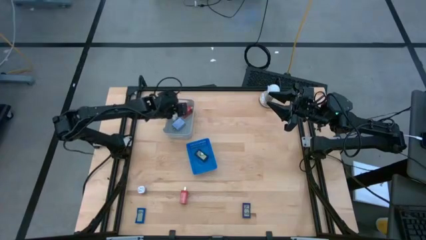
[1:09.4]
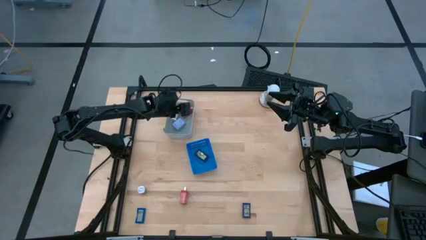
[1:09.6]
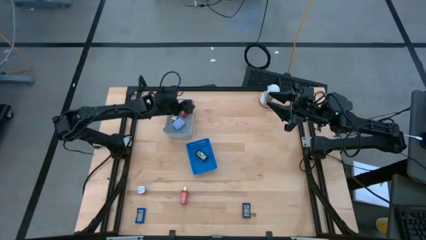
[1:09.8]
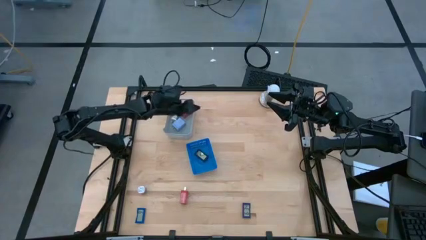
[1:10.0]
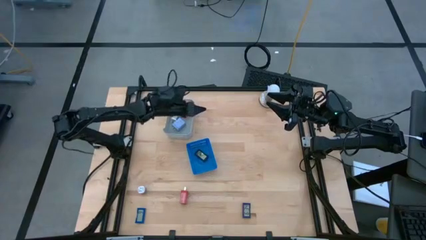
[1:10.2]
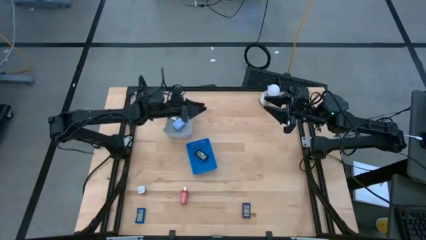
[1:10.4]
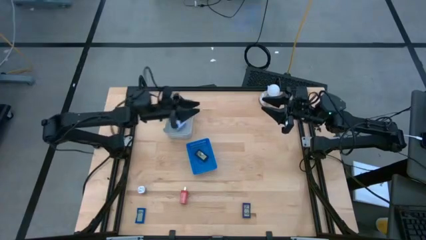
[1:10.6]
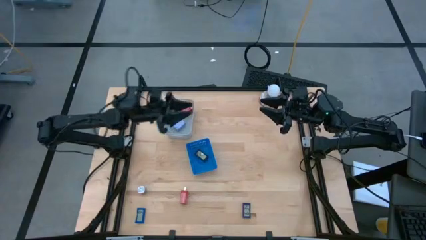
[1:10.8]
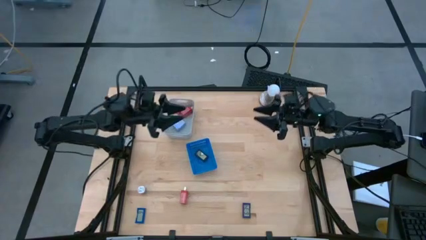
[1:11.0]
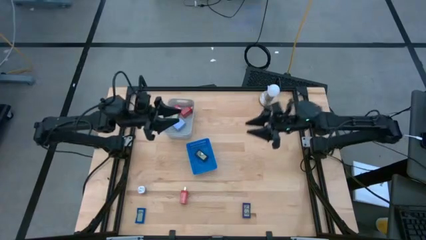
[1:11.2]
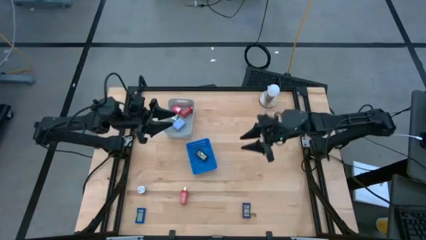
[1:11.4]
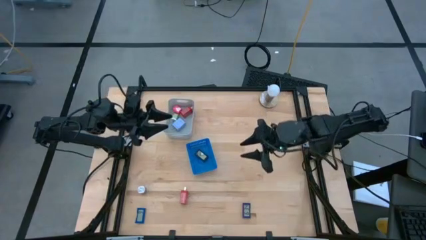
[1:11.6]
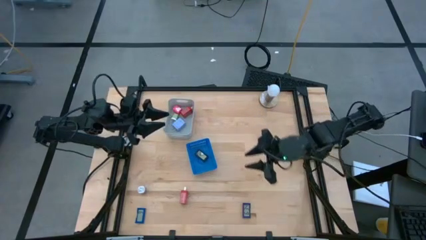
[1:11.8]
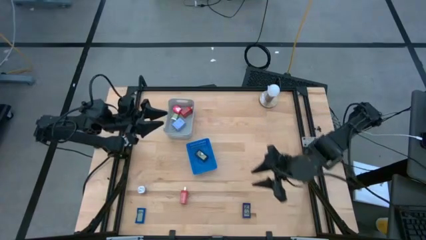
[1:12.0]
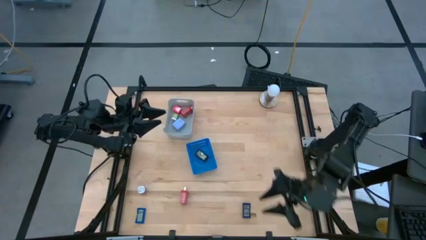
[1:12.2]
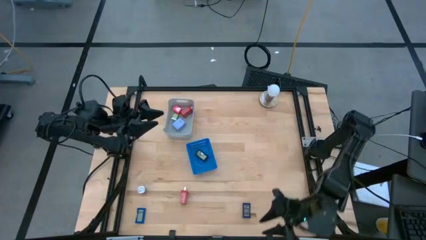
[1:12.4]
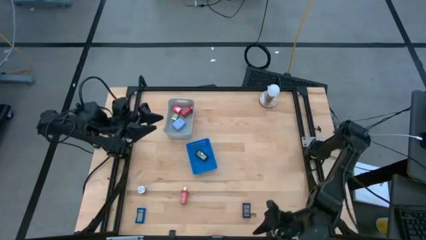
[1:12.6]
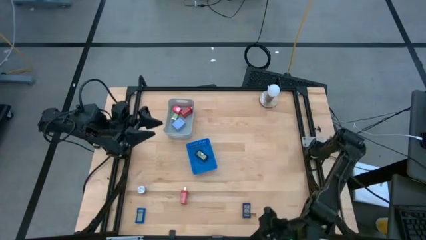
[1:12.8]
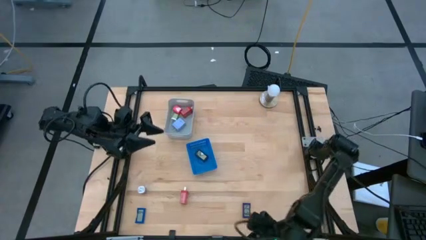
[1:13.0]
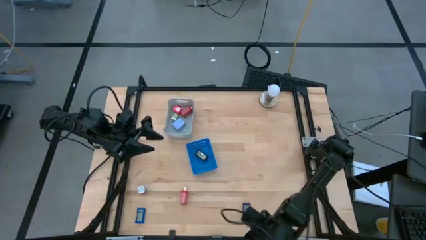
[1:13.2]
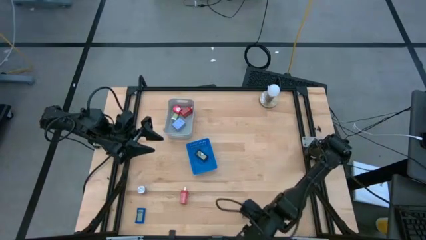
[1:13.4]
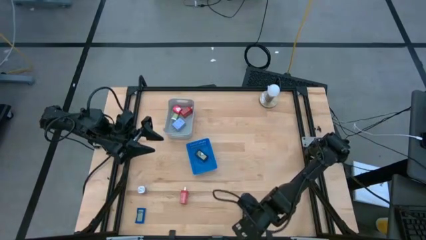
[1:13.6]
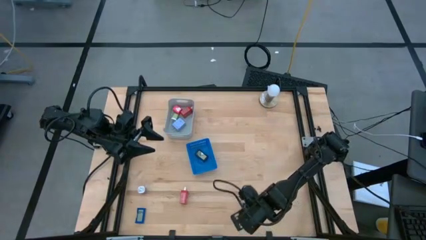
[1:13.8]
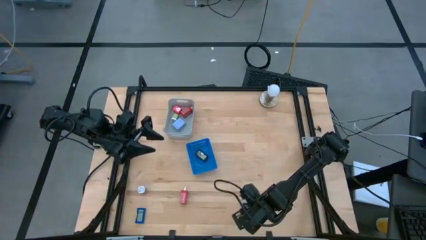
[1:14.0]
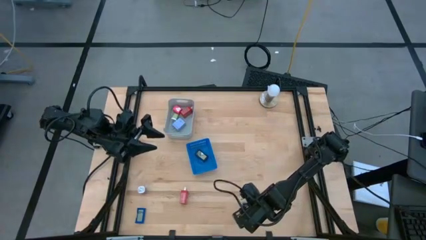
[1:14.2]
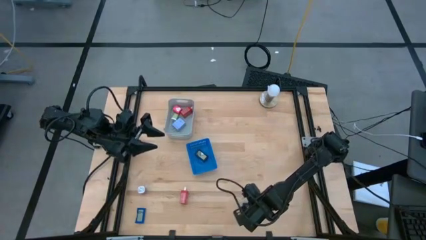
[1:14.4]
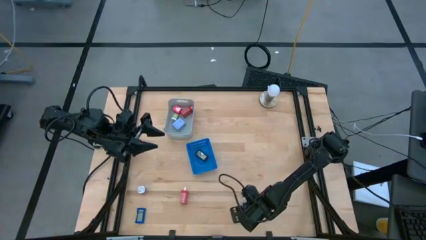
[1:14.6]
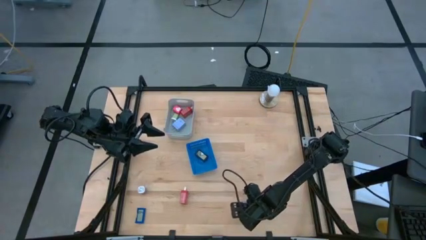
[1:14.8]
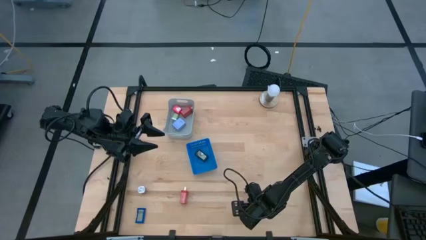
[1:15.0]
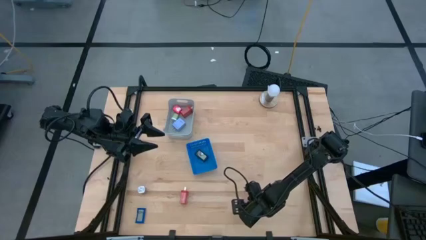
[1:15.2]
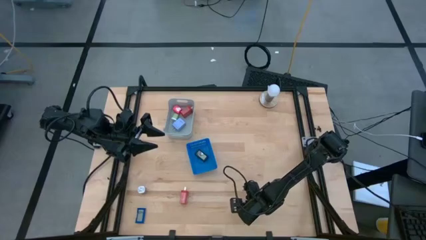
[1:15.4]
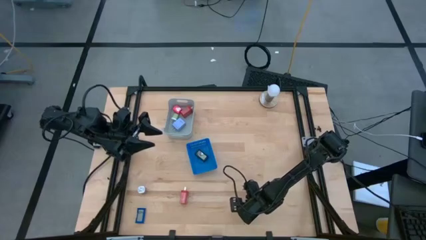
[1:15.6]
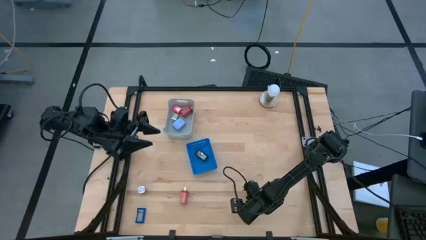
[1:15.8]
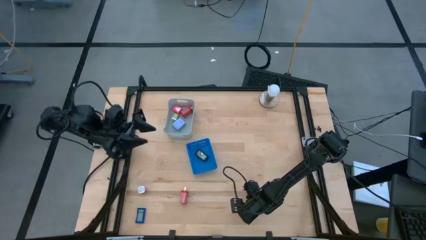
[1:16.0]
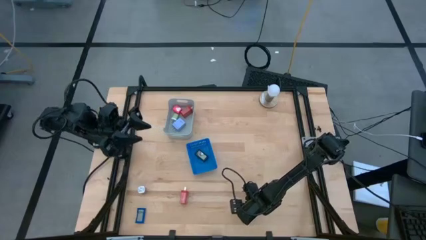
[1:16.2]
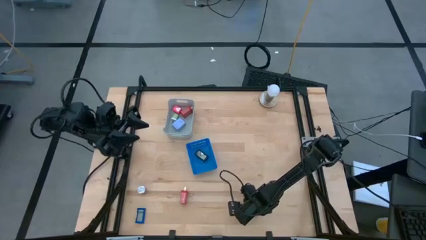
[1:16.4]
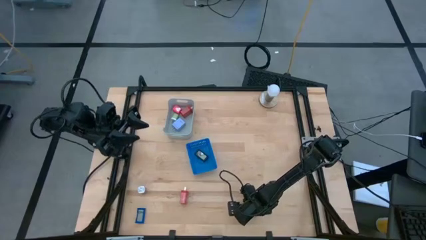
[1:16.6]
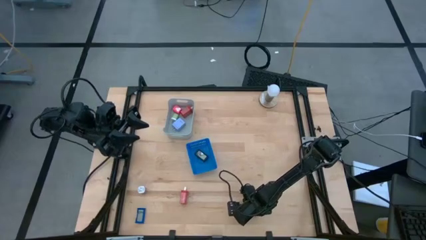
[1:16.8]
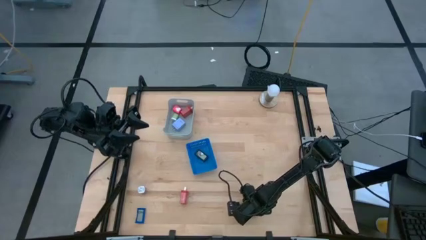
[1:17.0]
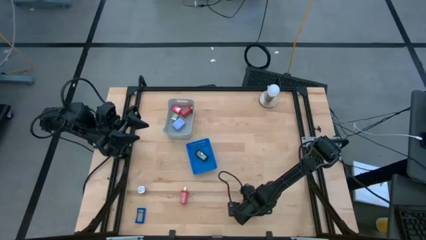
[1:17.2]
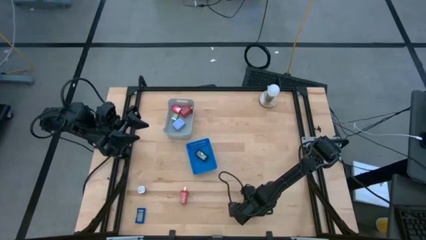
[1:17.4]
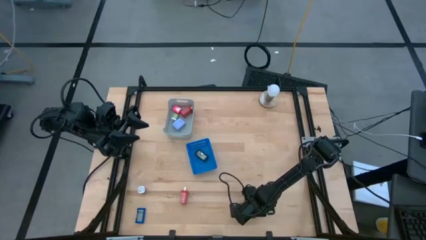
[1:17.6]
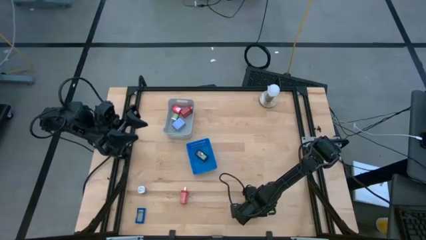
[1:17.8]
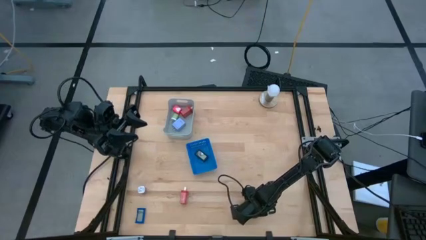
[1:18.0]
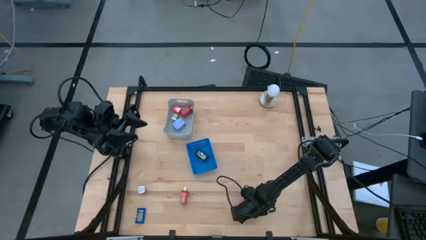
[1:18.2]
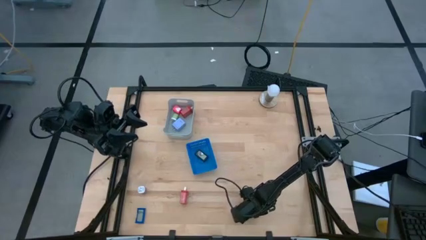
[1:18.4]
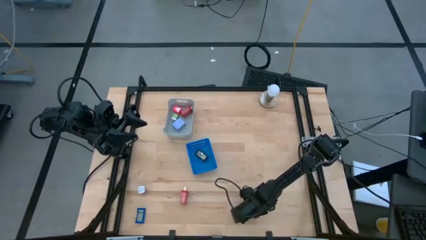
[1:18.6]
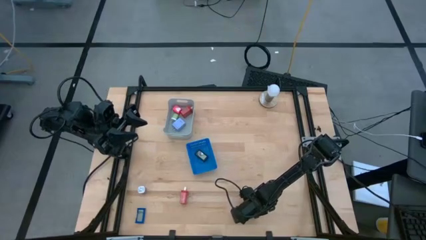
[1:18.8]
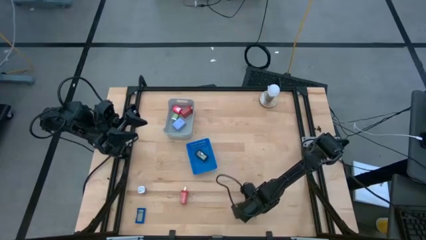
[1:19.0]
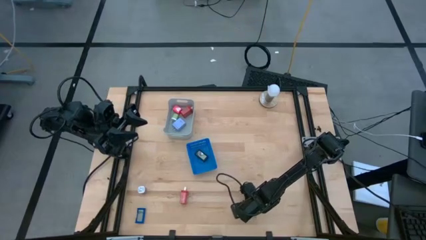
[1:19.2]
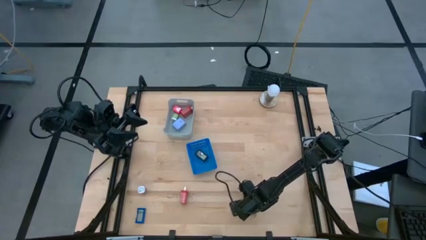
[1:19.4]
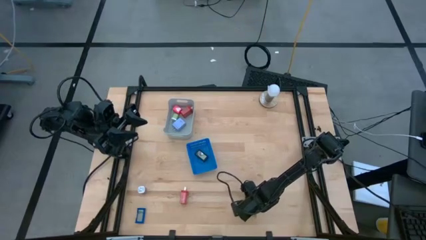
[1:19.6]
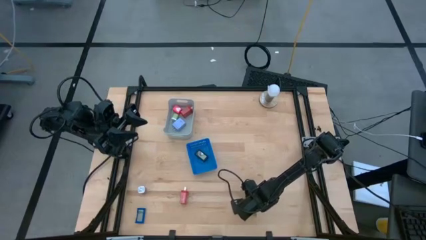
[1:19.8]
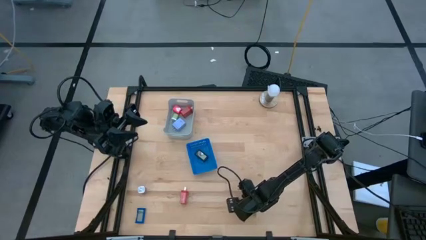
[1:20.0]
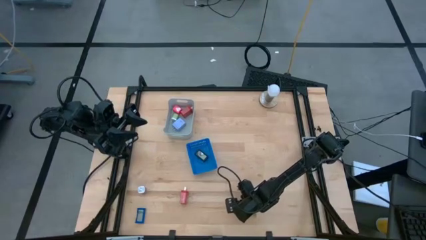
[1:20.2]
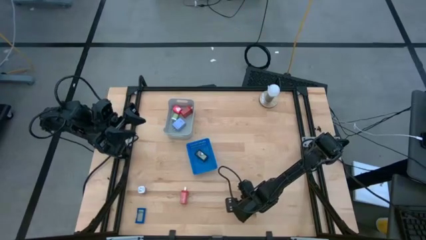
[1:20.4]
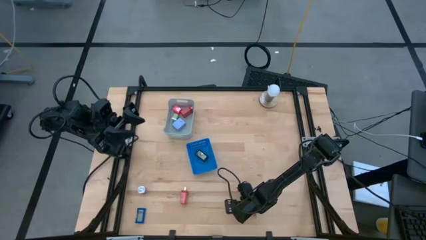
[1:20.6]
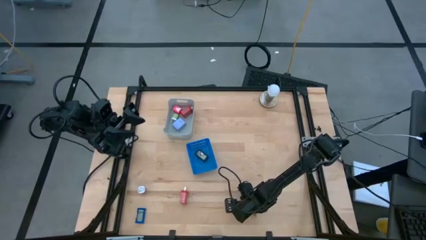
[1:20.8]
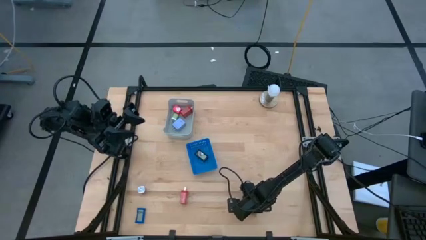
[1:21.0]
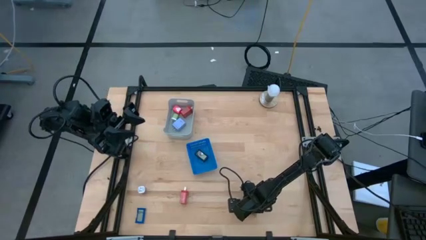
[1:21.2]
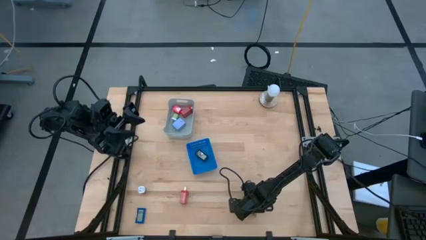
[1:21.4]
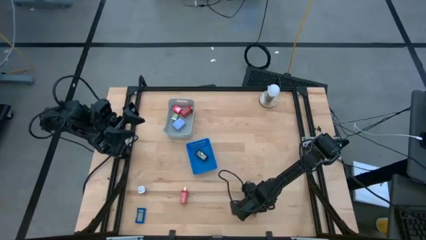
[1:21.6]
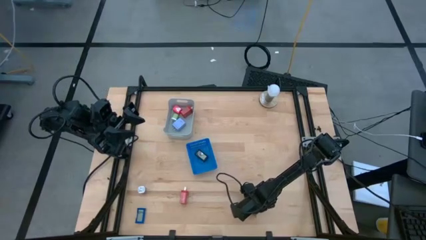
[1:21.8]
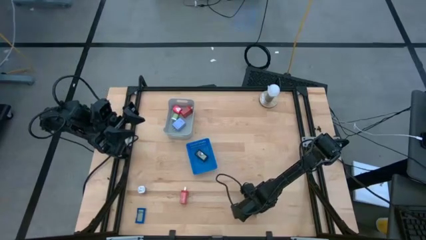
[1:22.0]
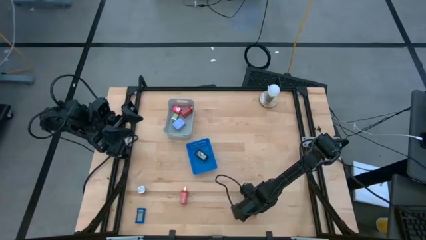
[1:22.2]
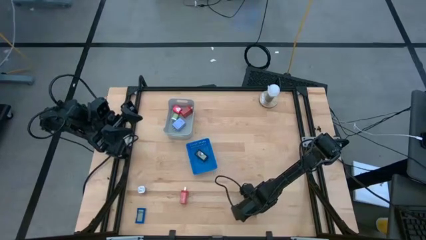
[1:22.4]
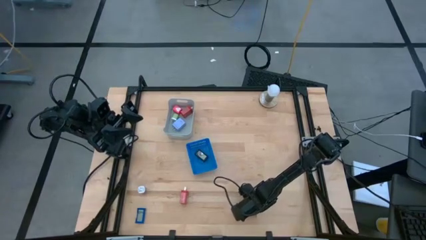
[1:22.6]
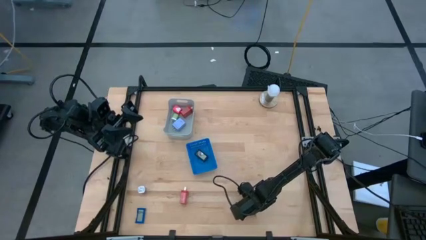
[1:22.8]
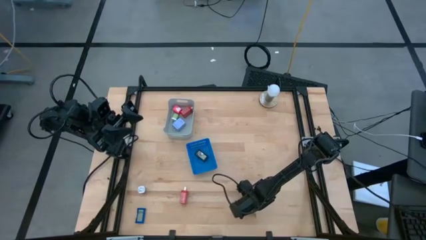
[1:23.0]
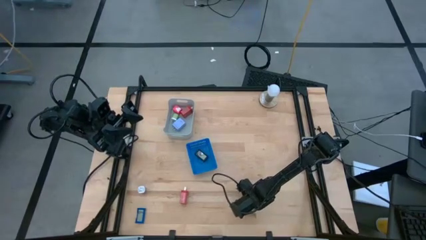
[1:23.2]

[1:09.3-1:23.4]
Task: Pick & Place Office items
Put the right blue digital timer into the blue basket

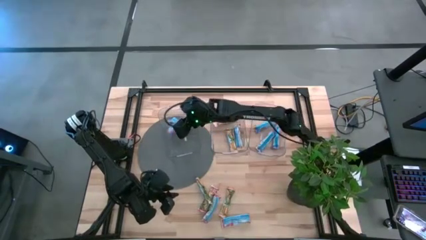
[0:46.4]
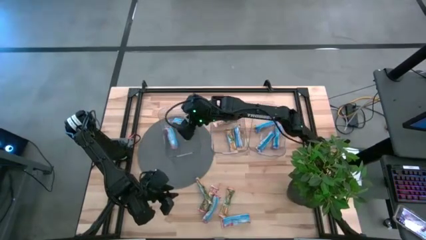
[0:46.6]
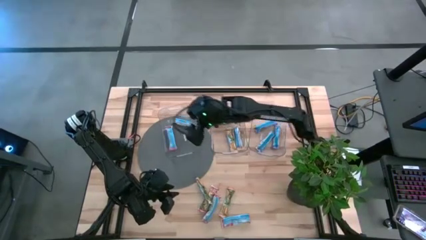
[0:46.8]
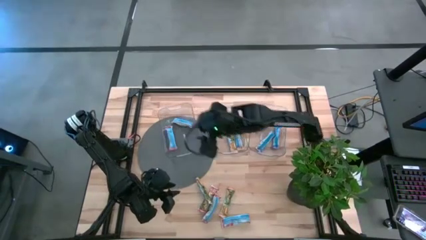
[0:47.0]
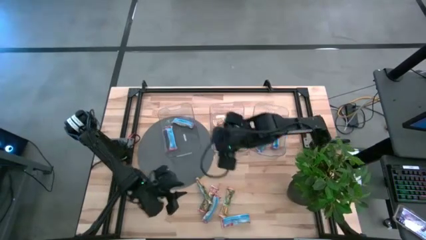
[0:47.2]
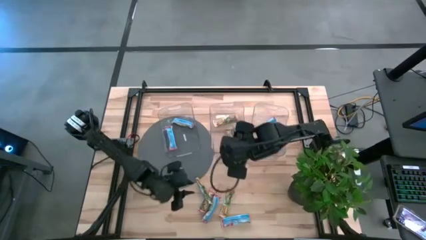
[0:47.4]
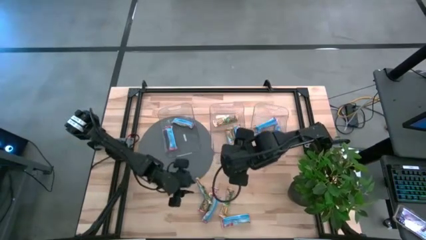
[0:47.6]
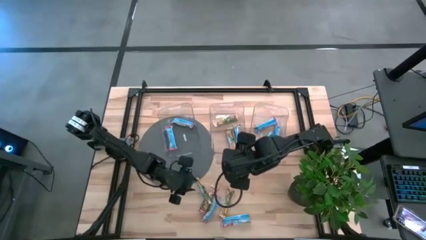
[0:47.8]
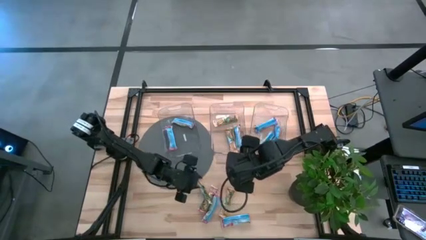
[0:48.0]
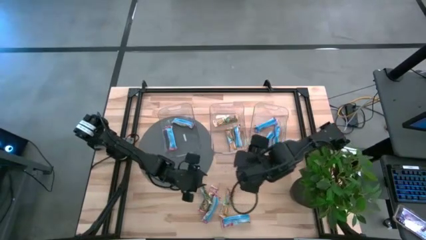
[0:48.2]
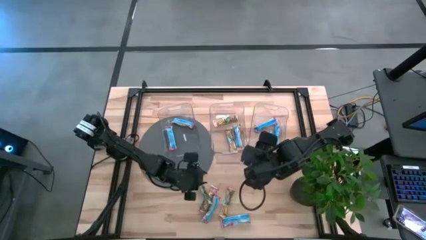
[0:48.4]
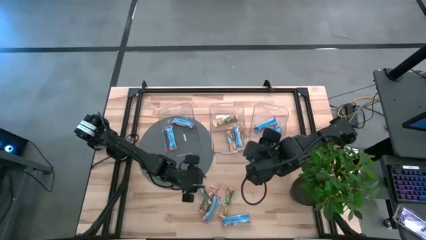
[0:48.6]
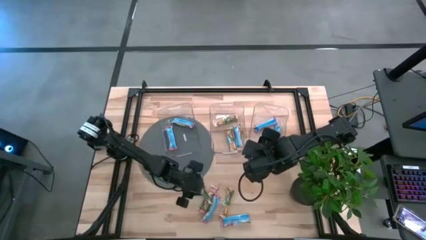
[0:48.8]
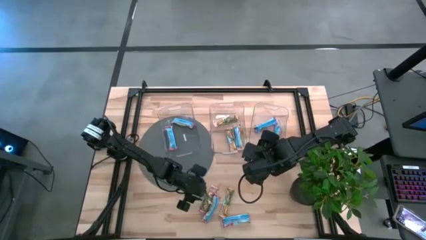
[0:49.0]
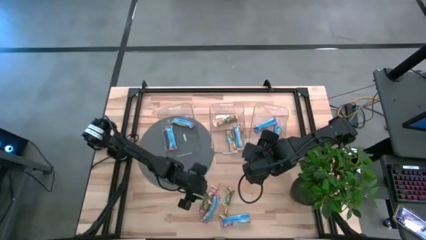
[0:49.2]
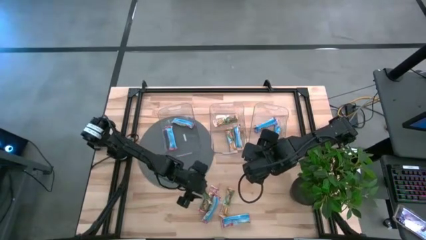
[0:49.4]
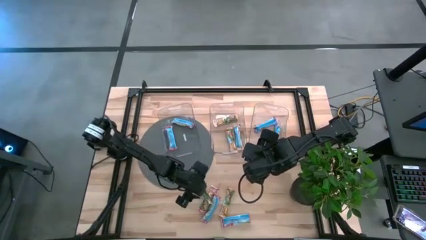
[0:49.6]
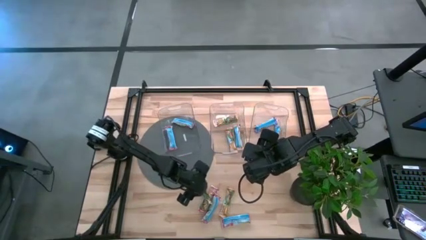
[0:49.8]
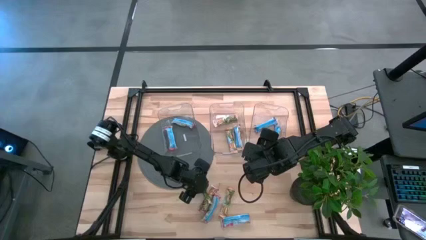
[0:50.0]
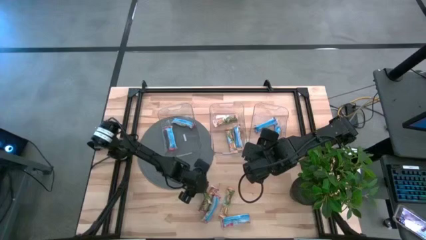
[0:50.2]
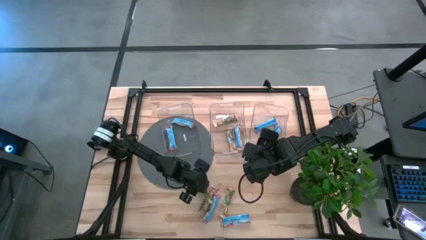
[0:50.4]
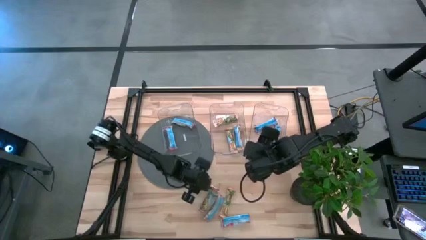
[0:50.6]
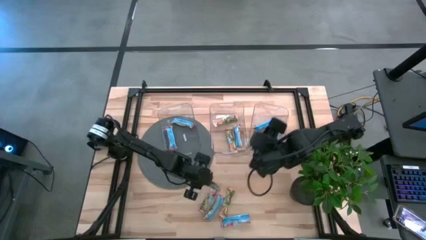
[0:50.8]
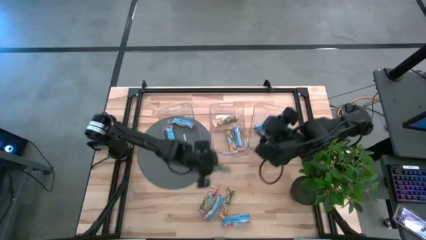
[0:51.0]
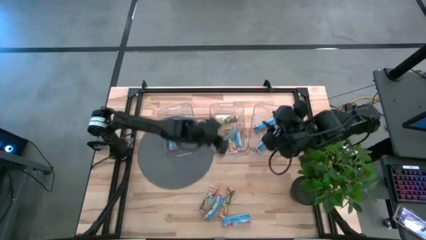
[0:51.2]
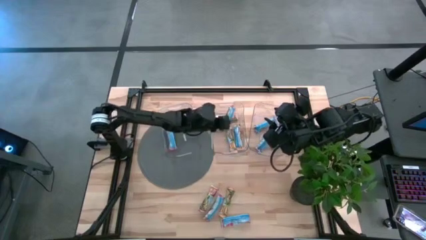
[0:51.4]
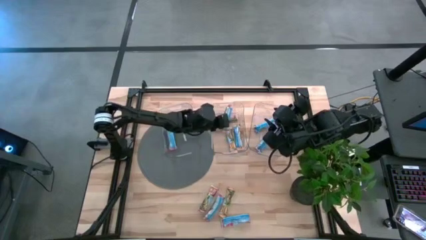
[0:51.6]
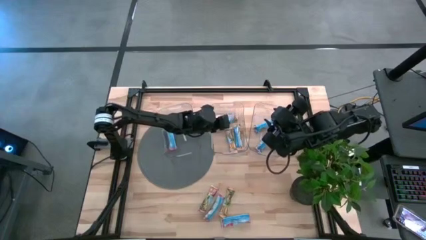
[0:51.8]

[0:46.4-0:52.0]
Task: Pick and place Granola Bars by type
Put the yellow granola bar into the middle transparent bin
